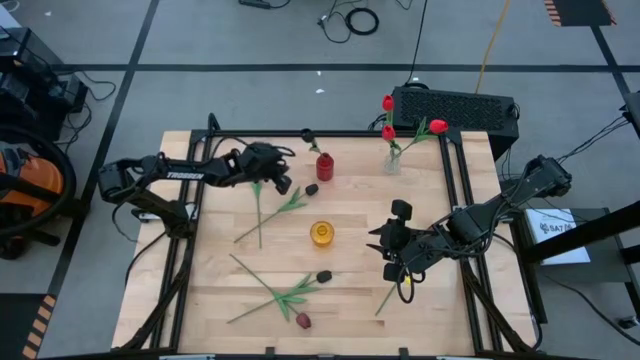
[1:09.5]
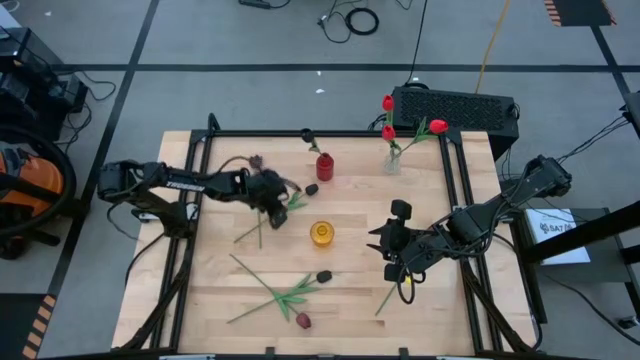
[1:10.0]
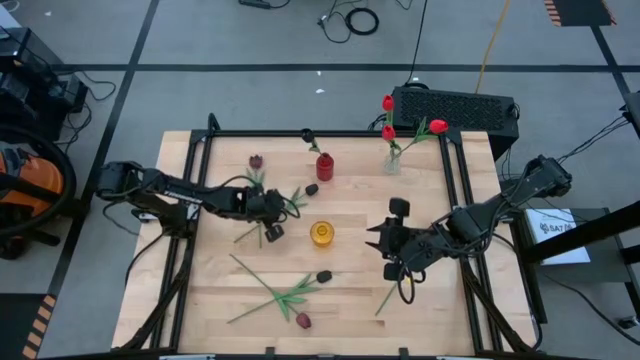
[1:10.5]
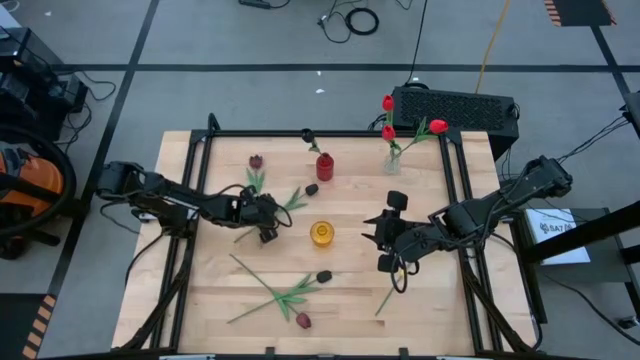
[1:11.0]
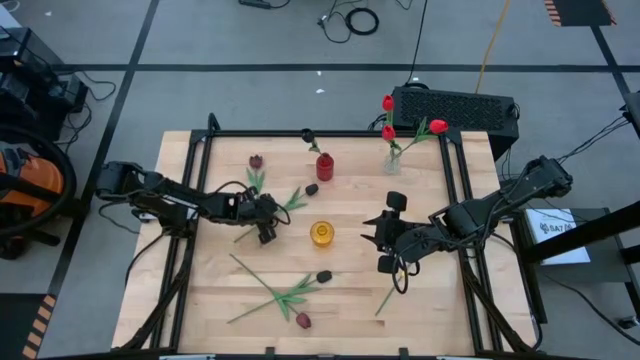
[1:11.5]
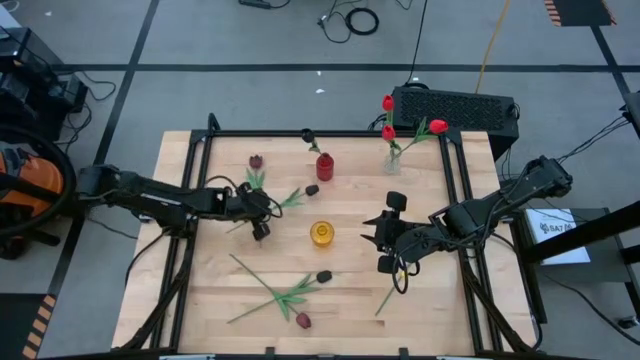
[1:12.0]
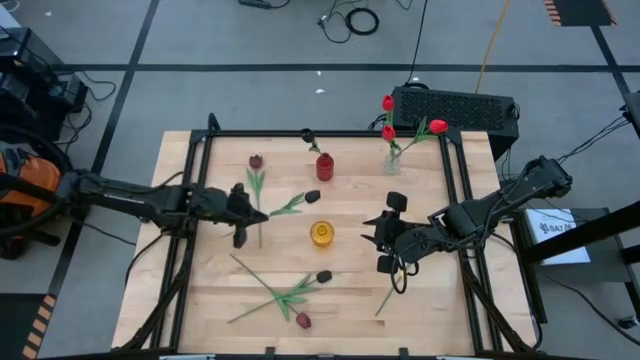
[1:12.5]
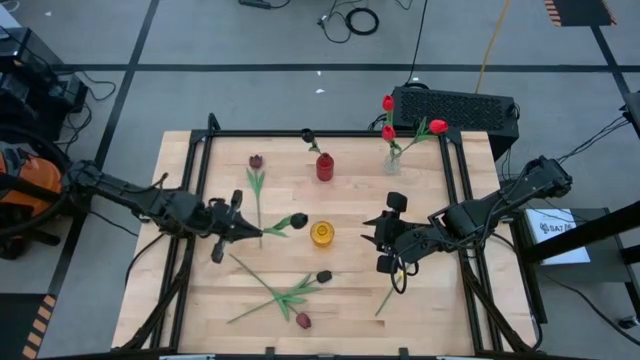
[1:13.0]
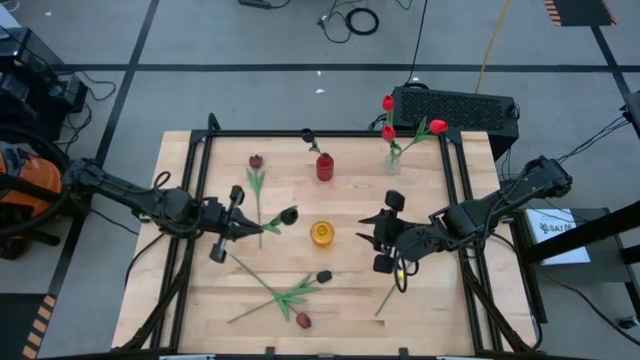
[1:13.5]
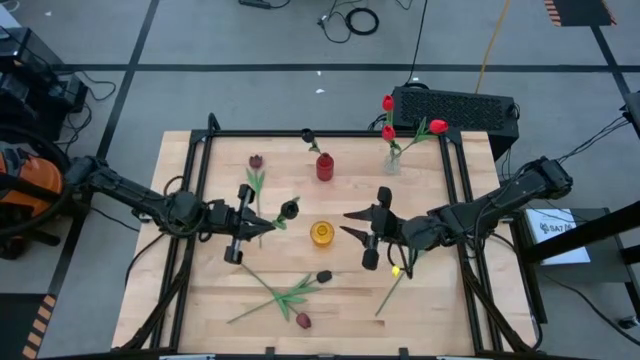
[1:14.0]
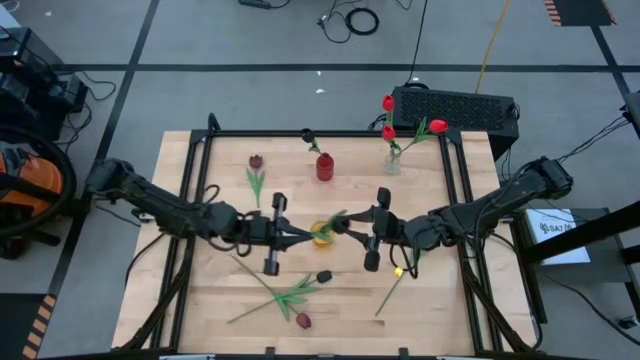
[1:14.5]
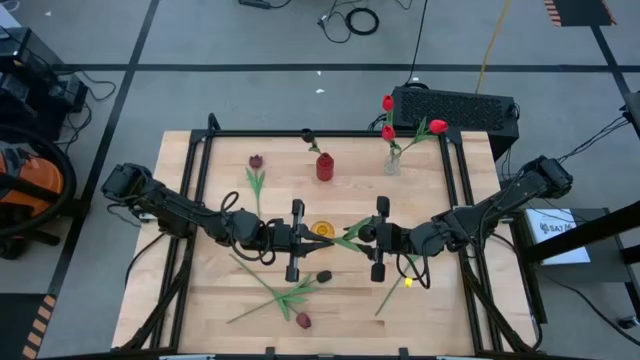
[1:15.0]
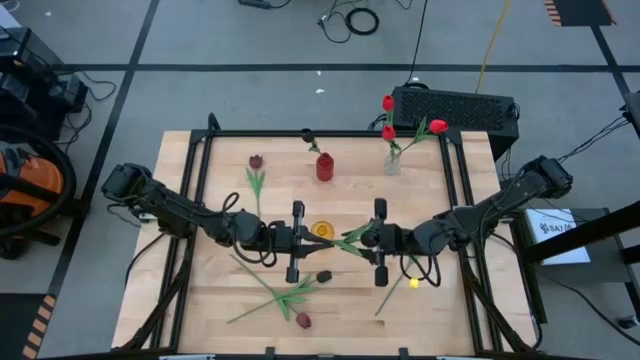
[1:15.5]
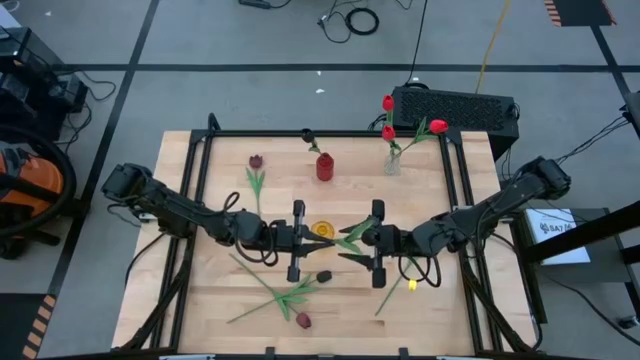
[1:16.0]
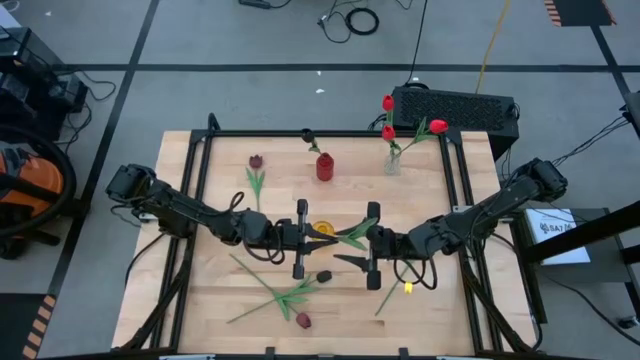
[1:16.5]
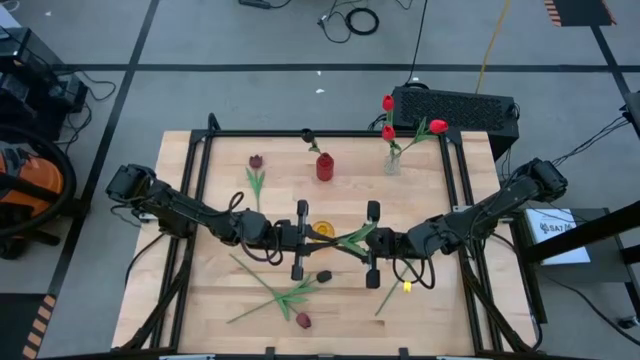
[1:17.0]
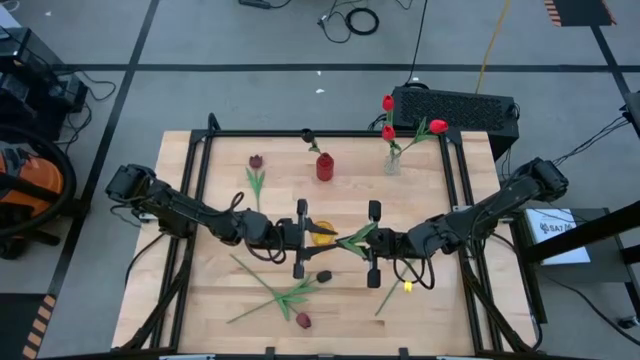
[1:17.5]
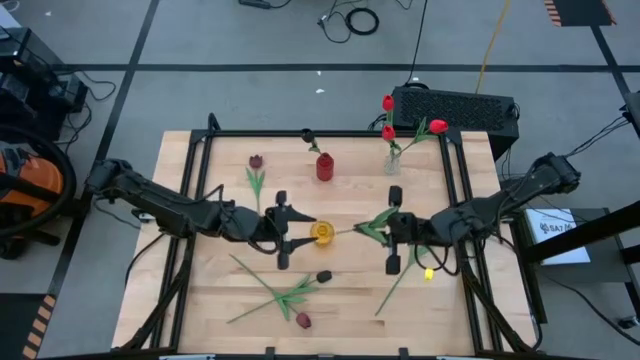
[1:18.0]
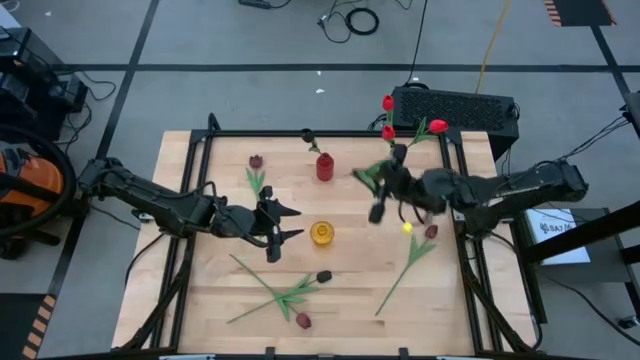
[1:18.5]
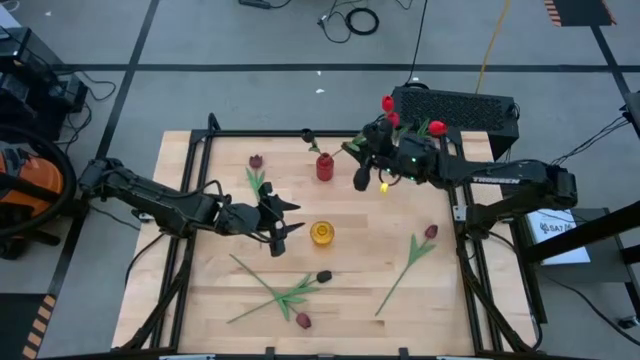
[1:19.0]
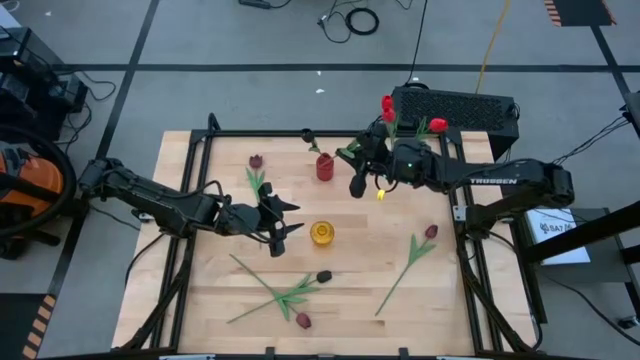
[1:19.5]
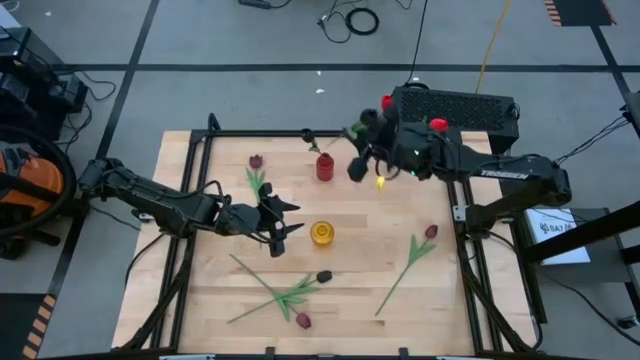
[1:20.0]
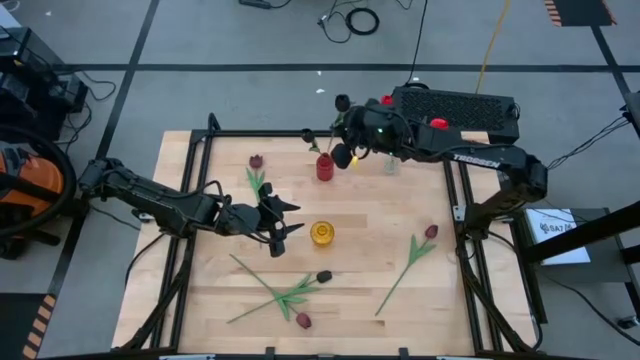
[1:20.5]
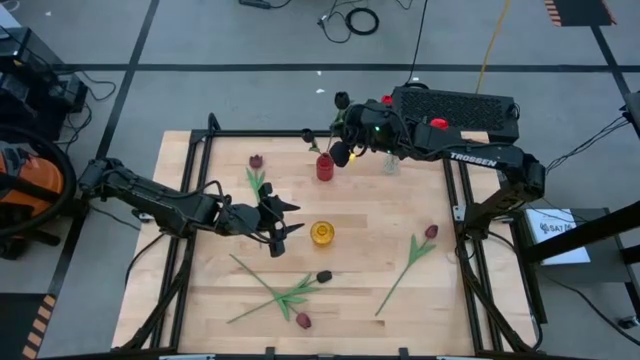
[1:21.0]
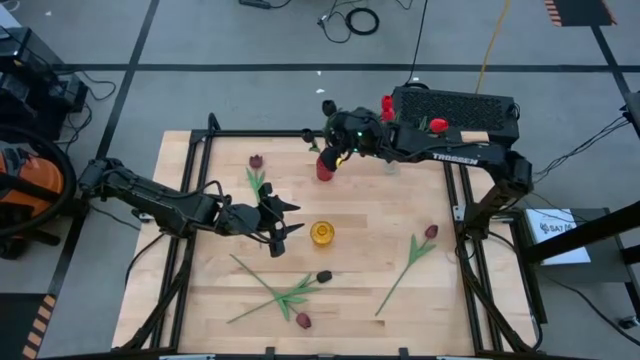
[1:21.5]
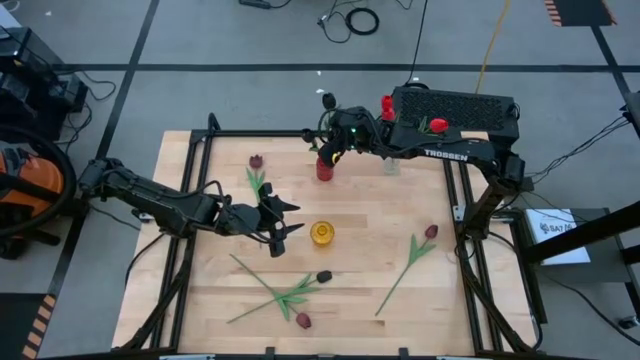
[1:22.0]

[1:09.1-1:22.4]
Task: Sort flowers into vase by color
Put the top black flower into the red vase

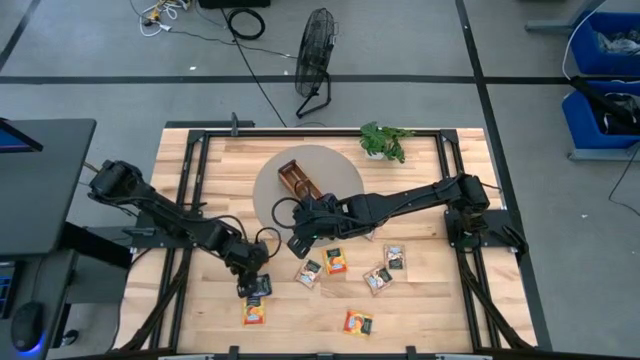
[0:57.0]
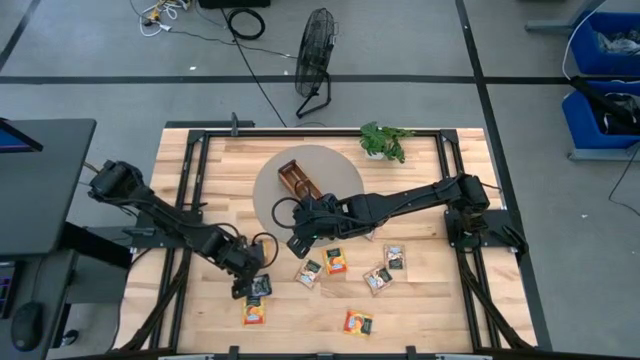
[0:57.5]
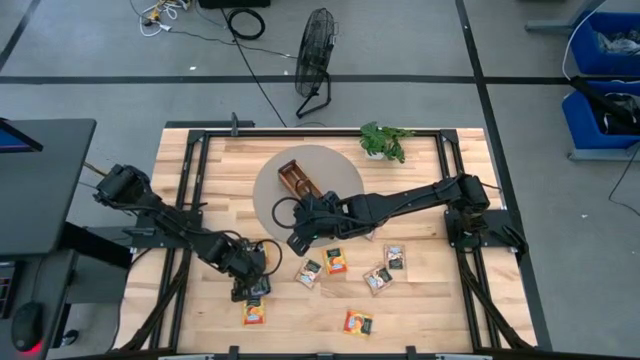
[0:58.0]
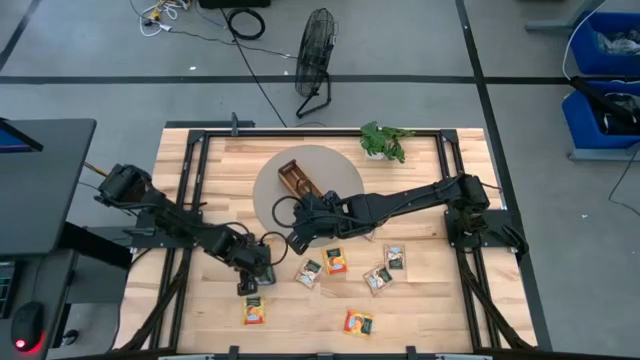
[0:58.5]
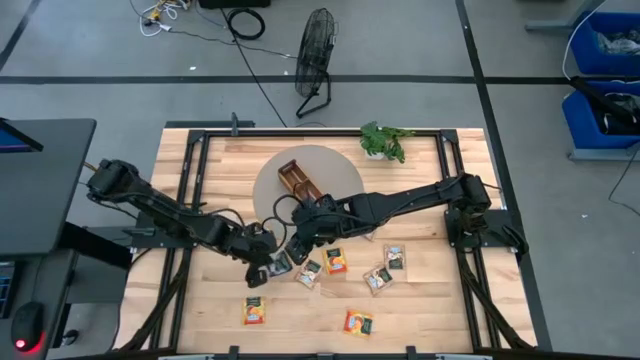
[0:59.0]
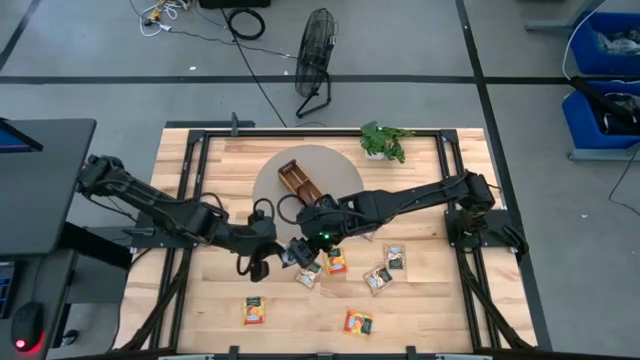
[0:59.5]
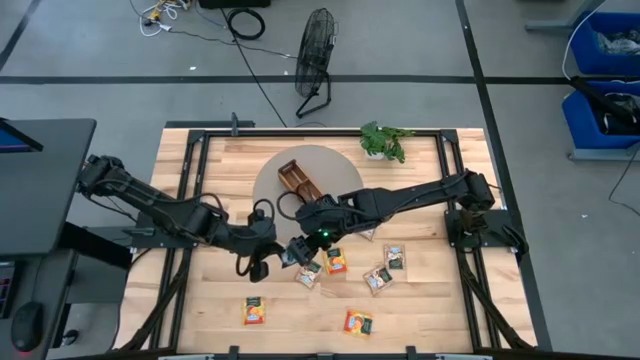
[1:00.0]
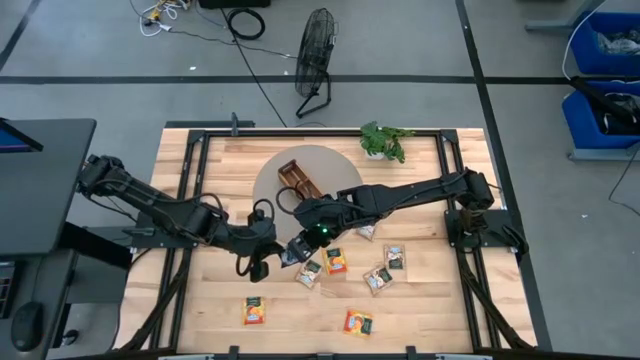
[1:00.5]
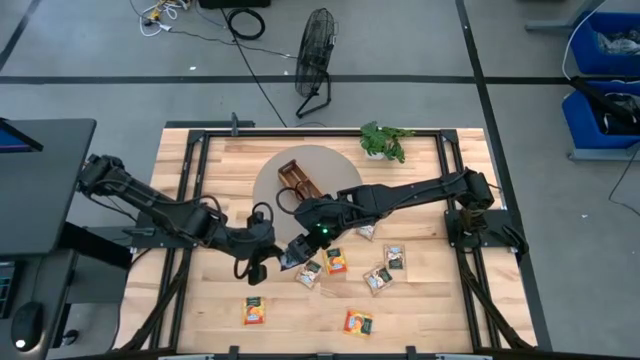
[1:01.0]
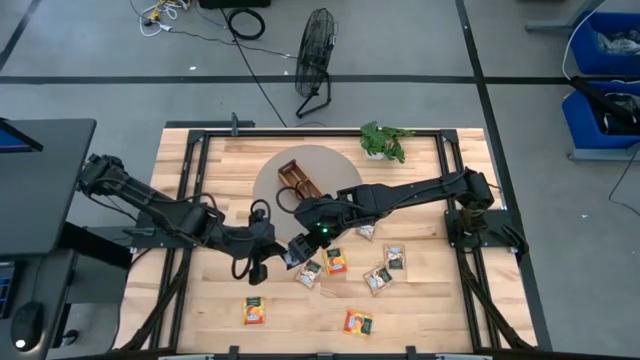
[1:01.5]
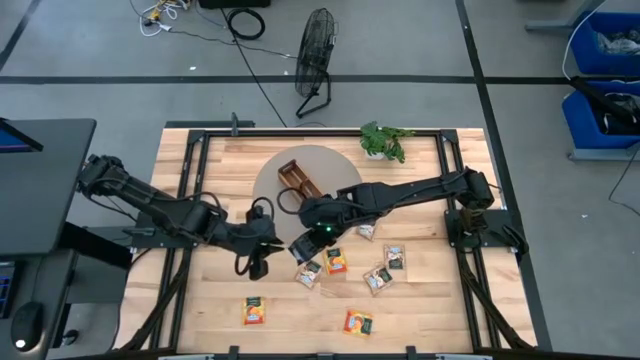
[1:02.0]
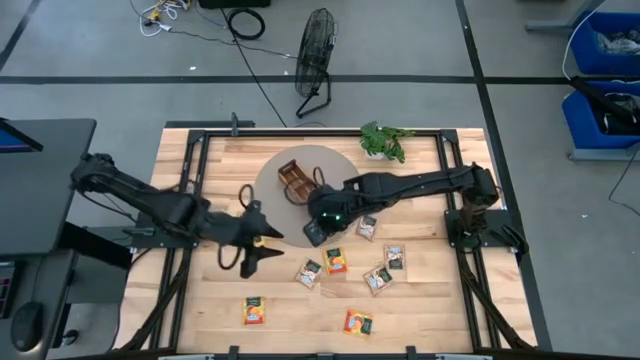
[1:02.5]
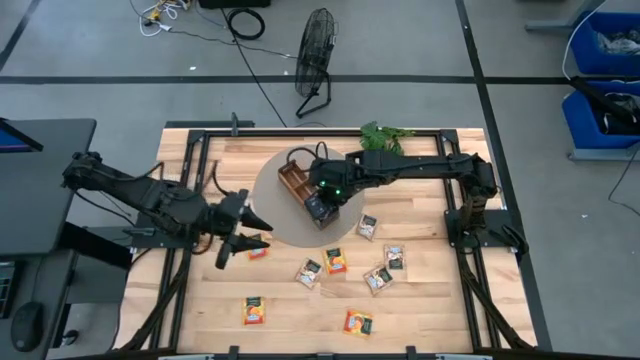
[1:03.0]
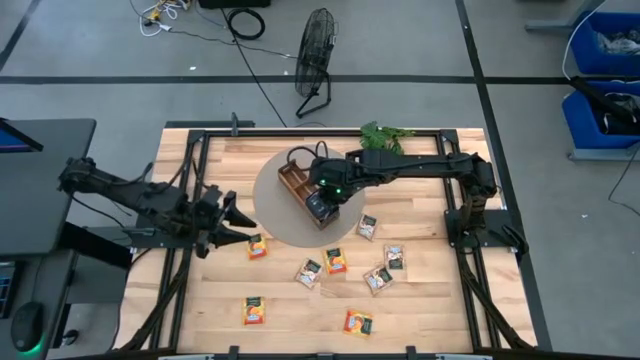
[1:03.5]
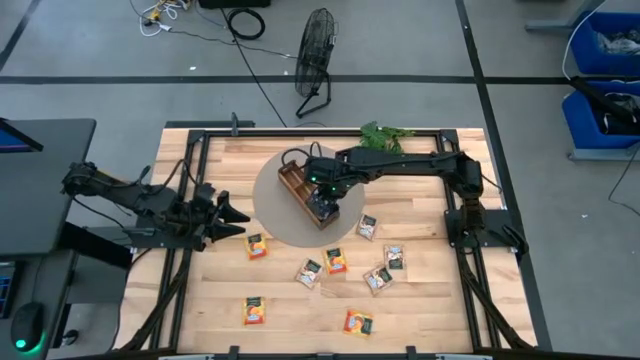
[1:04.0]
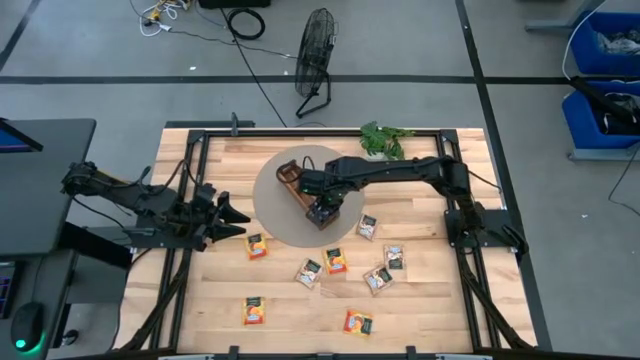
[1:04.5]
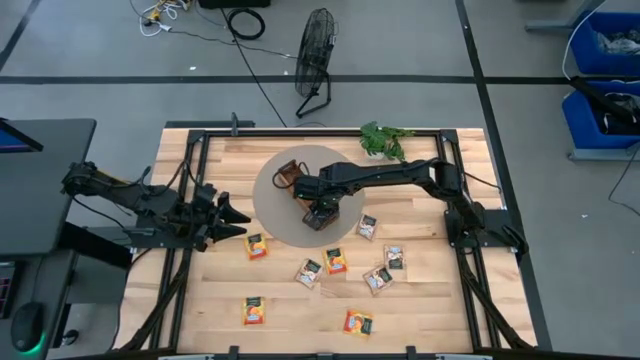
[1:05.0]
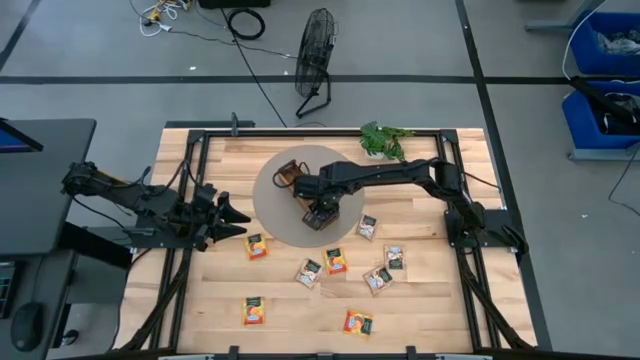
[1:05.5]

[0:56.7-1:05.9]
Task: Pick & Place Tea
Put the purple tea bag into the right section of the wooden organizer
